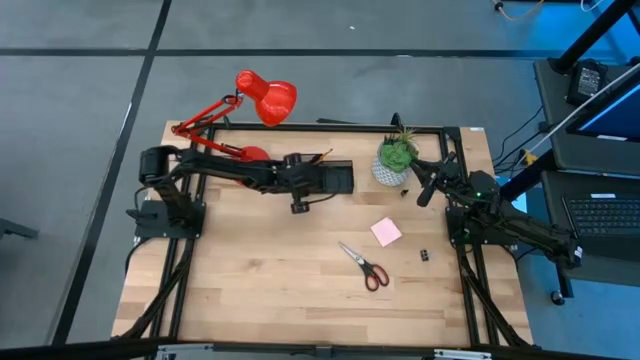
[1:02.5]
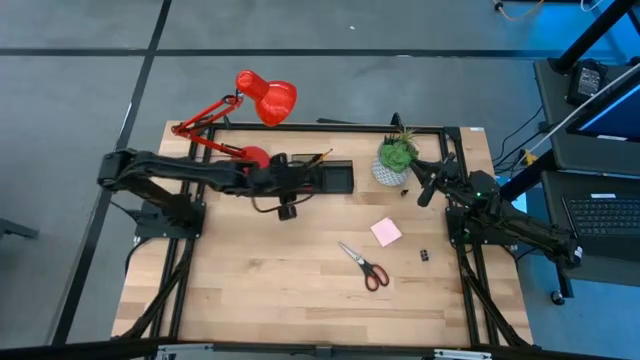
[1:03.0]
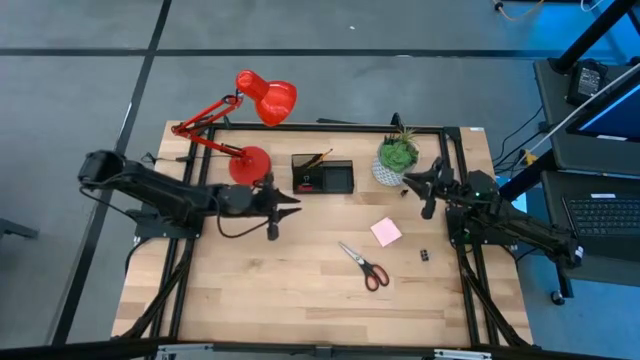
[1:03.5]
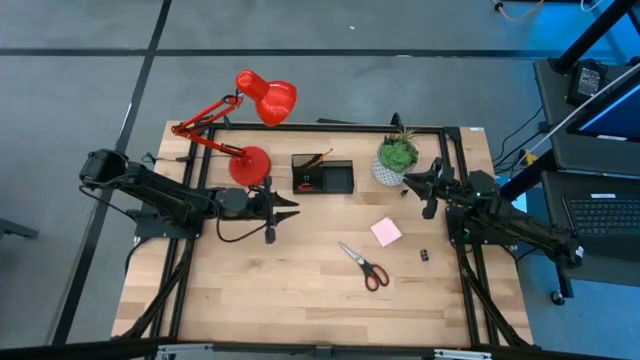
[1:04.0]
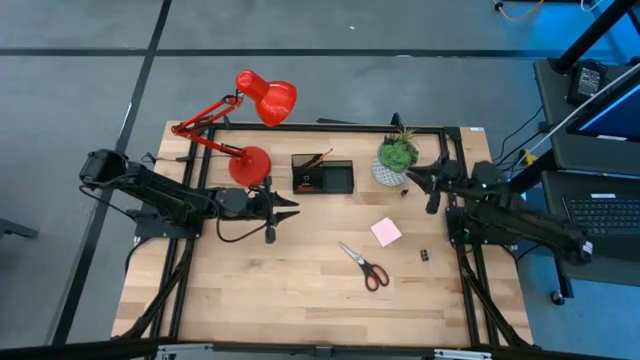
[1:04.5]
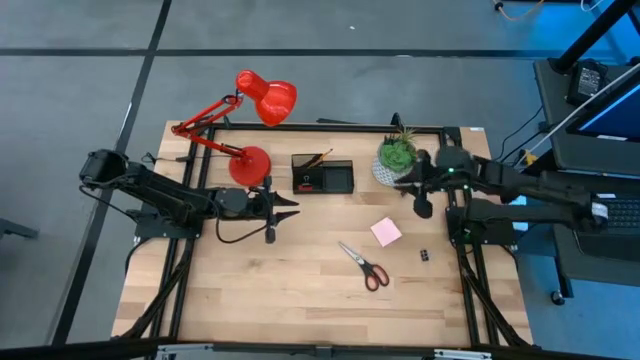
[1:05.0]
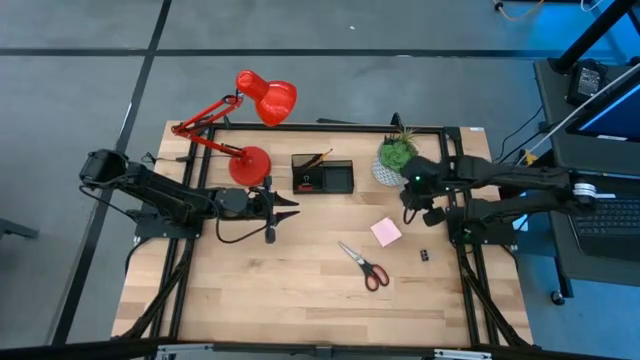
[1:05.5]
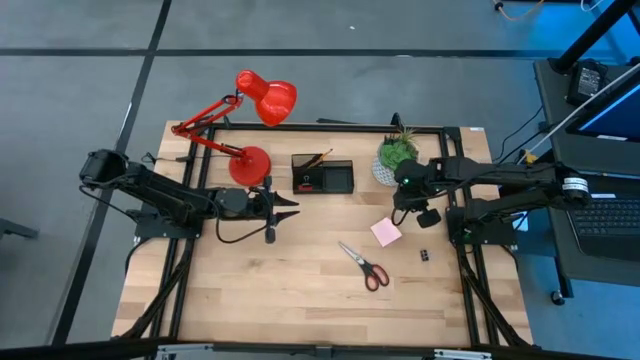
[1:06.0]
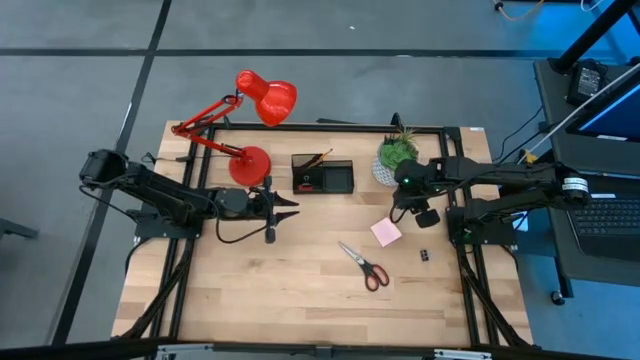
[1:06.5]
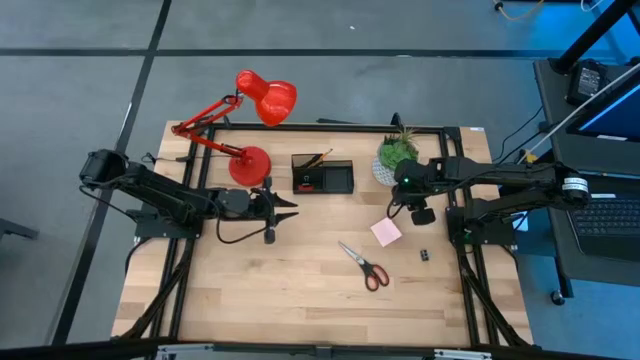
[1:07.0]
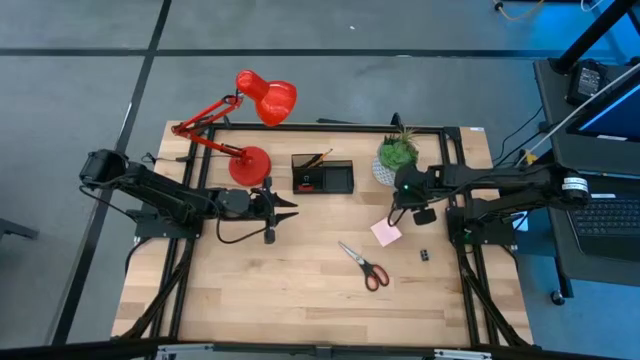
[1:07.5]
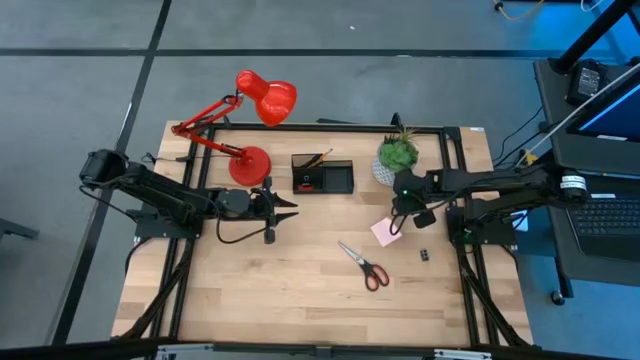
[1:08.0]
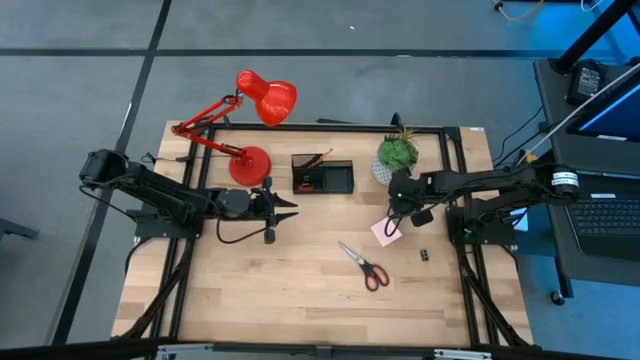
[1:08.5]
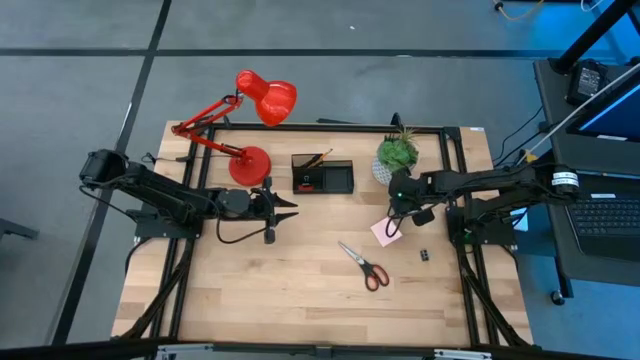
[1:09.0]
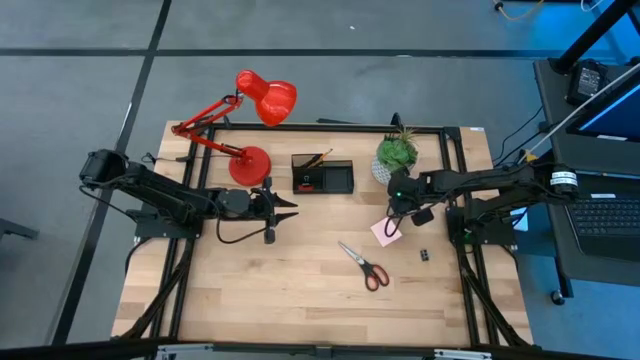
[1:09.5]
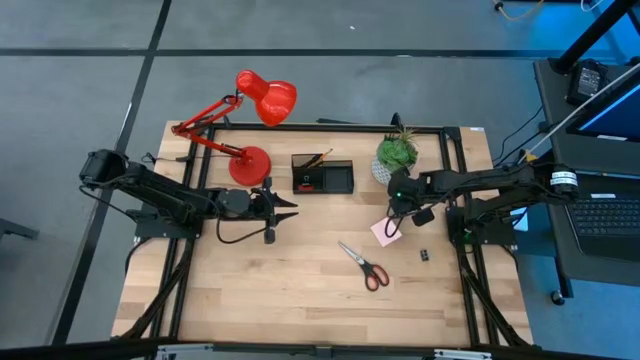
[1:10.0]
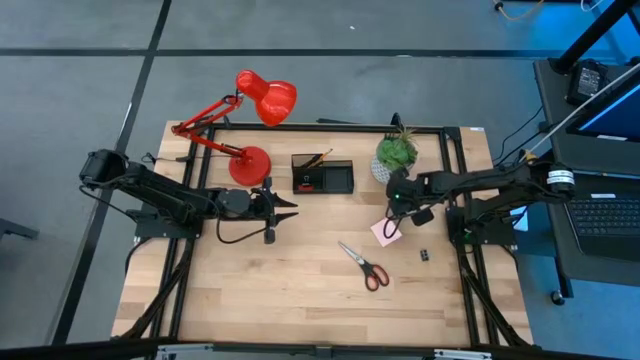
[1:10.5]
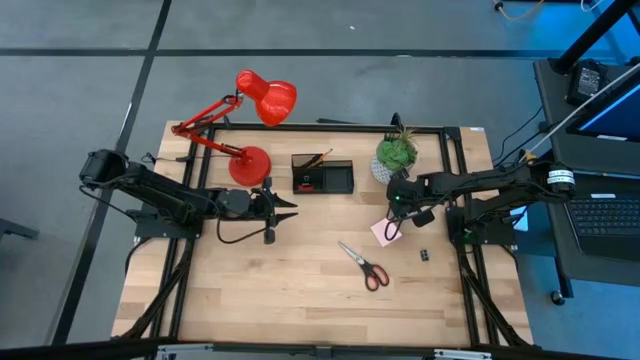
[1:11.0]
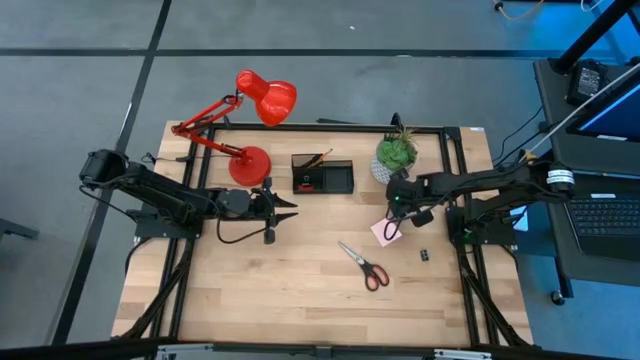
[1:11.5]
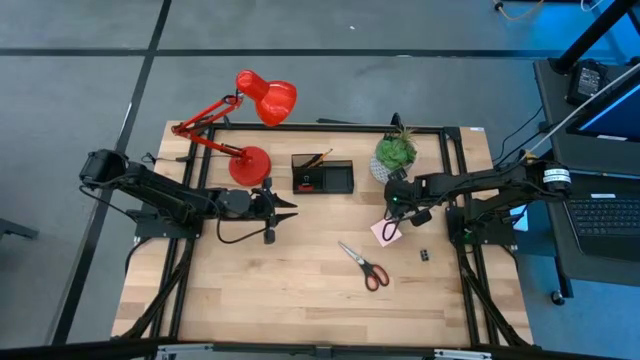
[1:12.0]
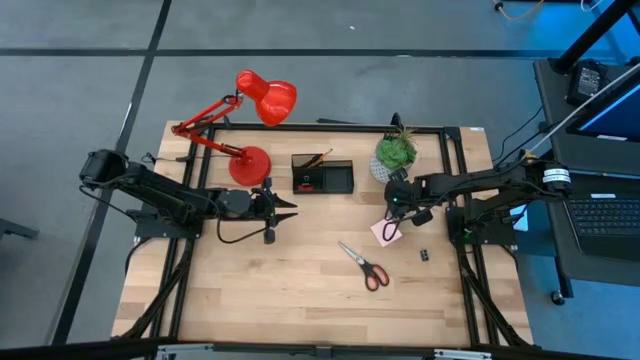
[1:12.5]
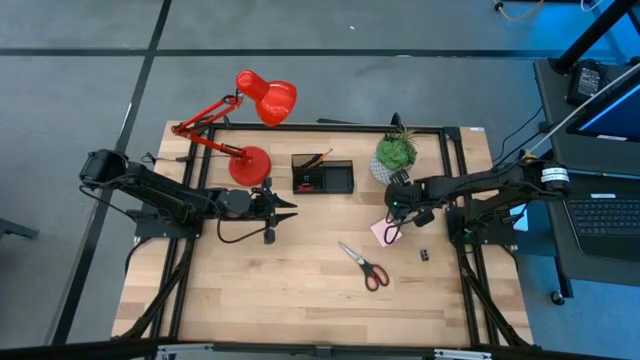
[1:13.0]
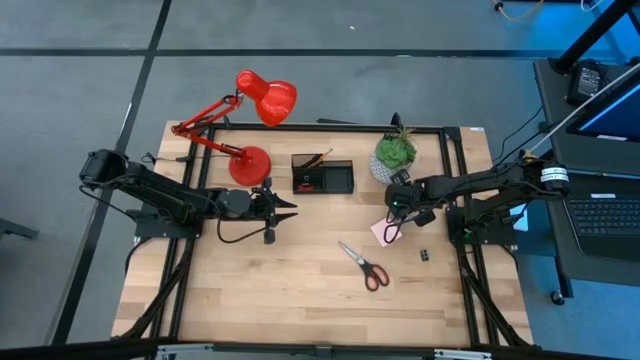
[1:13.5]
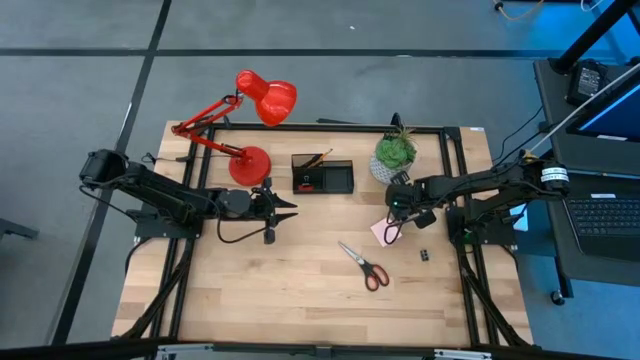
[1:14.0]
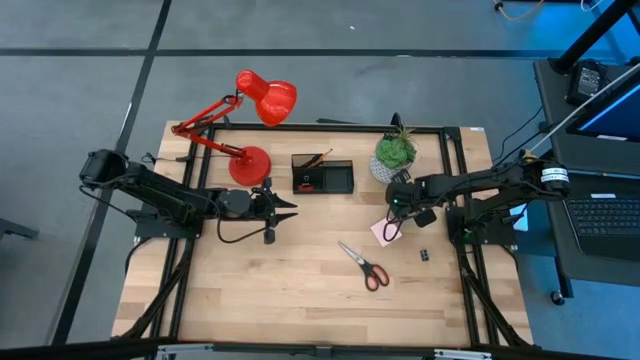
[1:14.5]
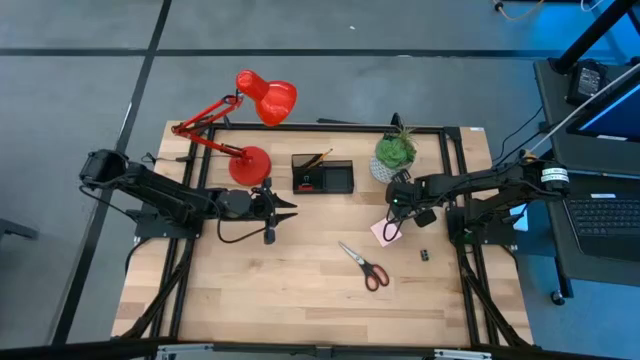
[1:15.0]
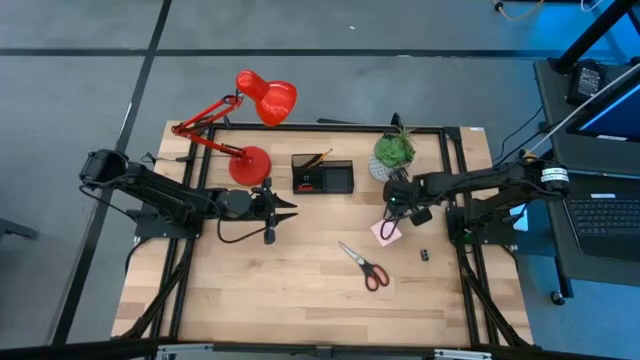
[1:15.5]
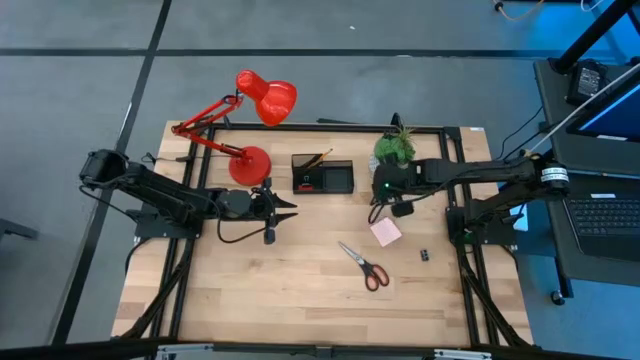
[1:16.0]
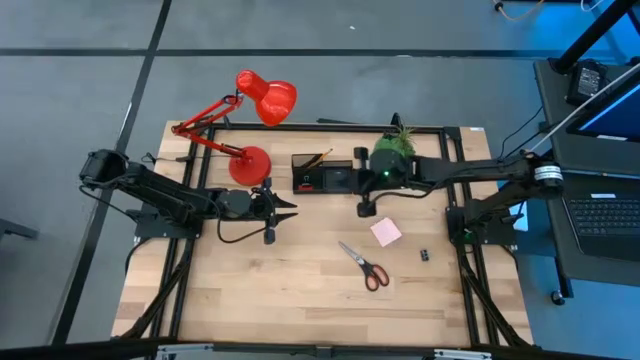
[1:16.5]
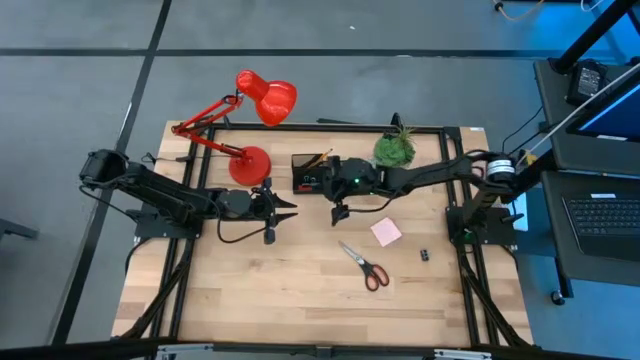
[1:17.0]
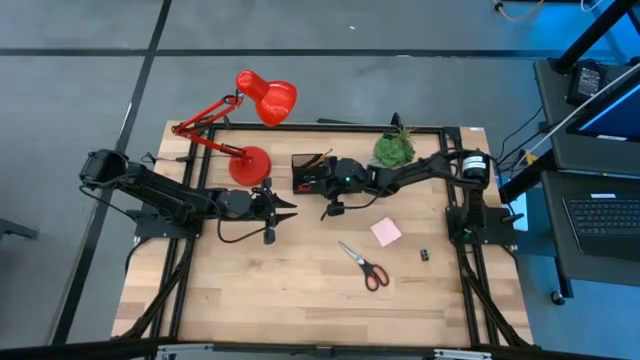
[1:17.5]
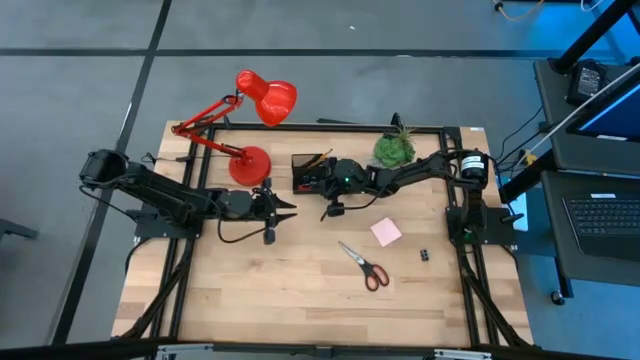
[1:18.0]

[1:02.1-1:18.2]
Task: Pick and place office supplies into organizer
Put the top binder clip into the desk organizer

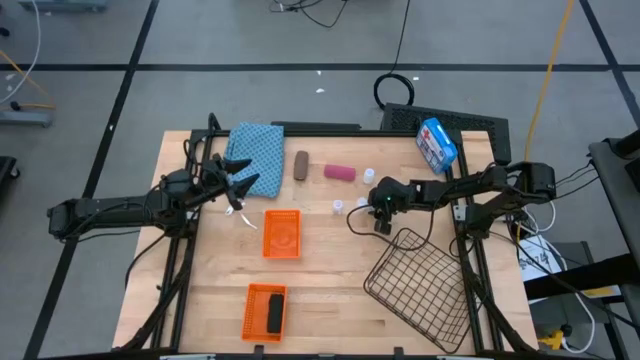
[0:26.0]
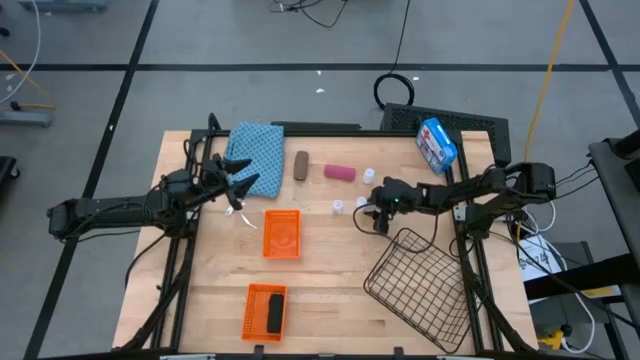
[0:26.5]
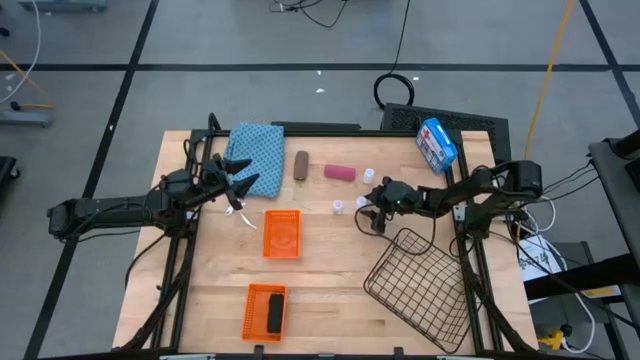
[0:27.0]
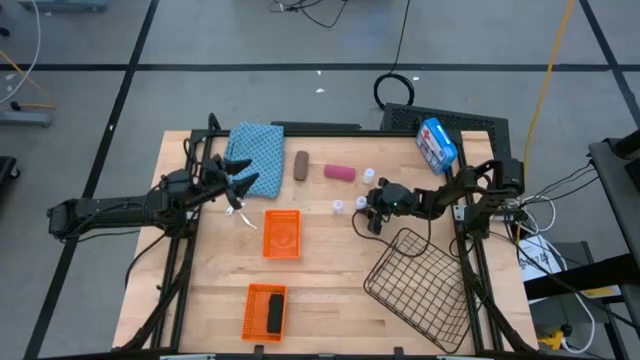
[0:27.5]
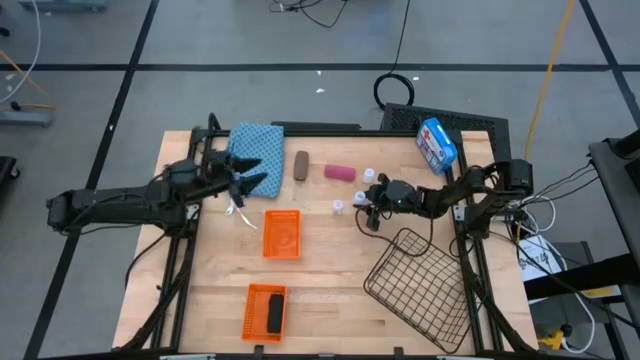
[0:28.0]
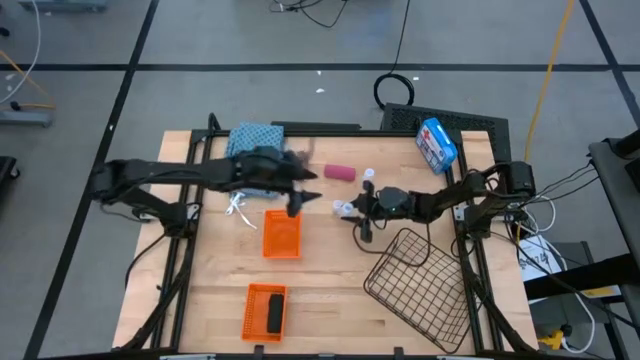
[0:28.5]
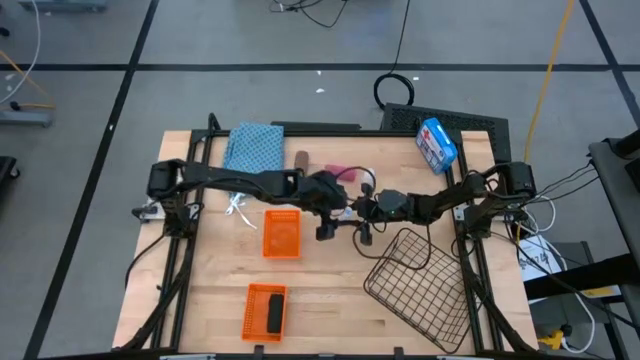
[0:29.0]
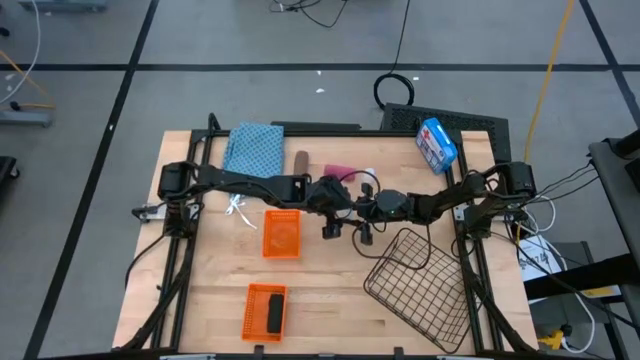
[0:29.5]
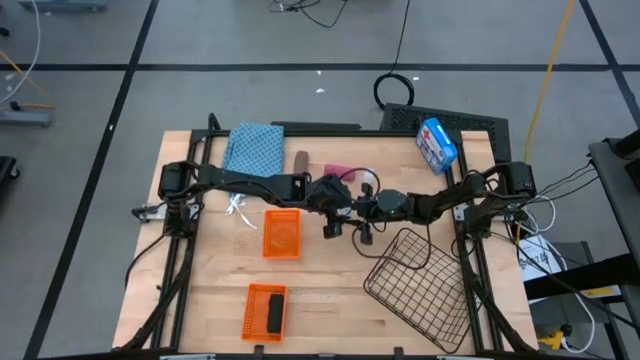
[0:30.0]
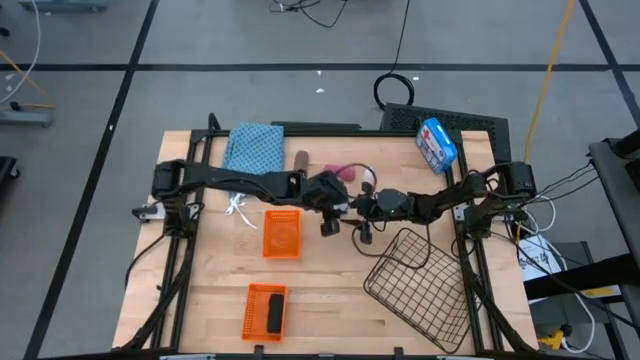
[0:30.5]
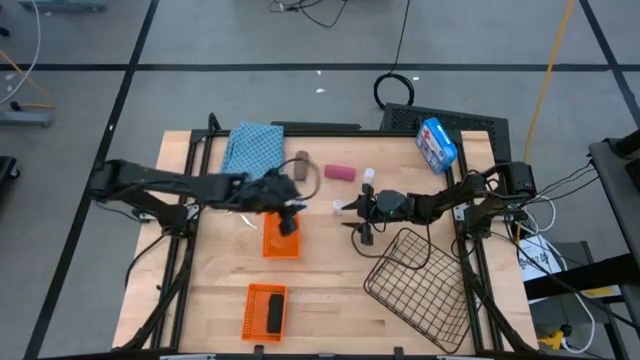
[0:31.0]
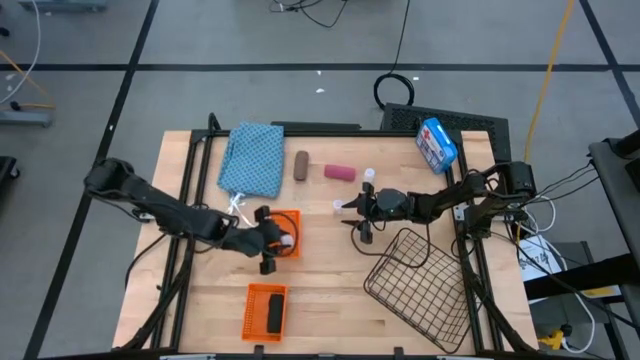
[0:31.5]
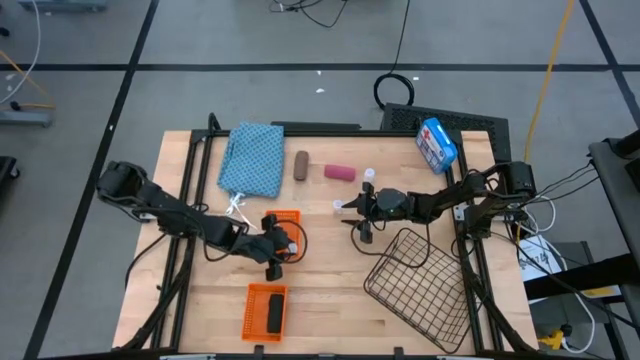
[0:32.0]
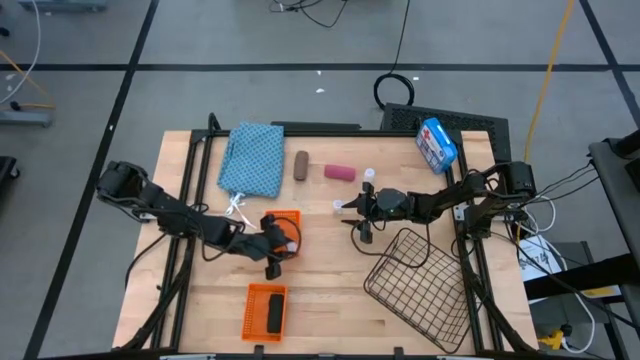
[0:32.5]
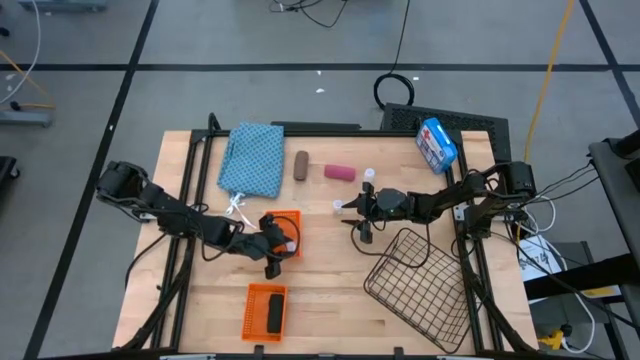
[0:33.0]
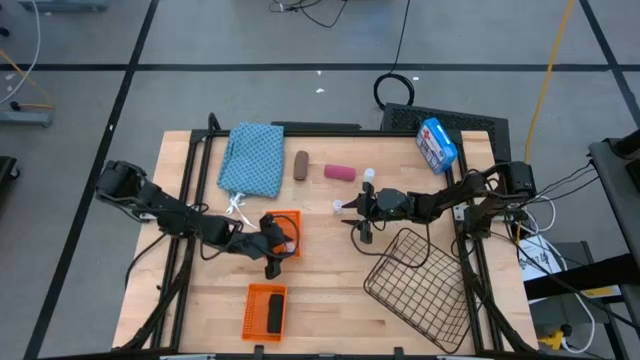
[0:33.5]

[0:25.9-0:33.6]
Task: Pick & Place Medicine items
Put the bottom white medicine bottle into the top orange basket
